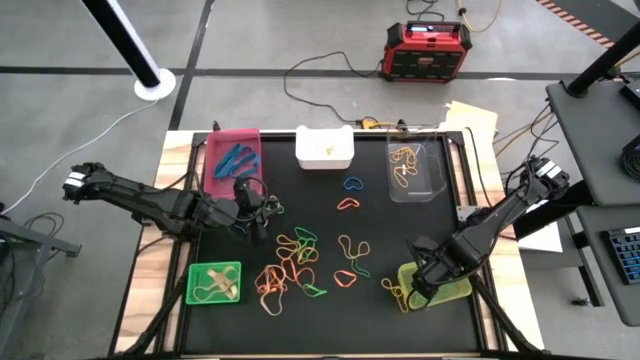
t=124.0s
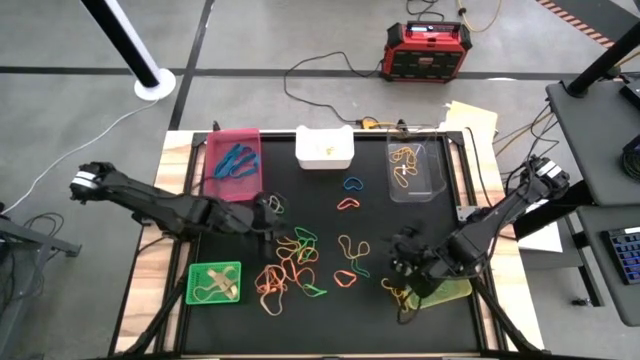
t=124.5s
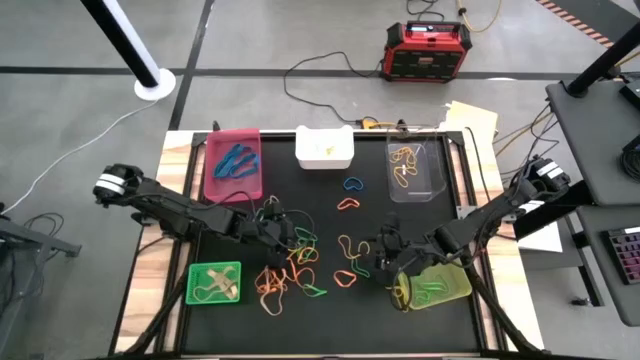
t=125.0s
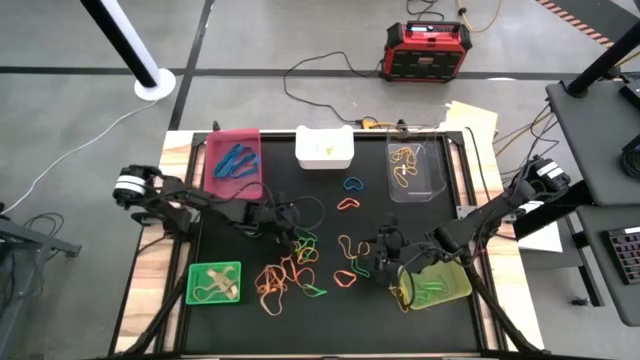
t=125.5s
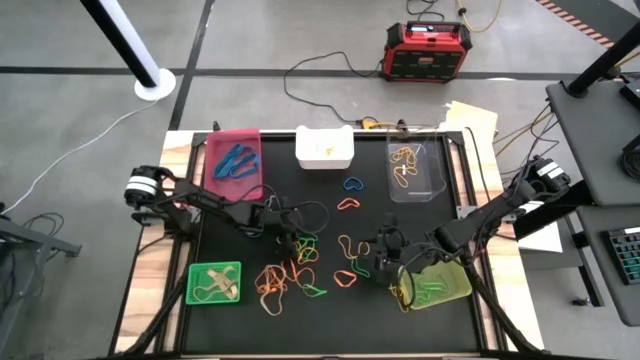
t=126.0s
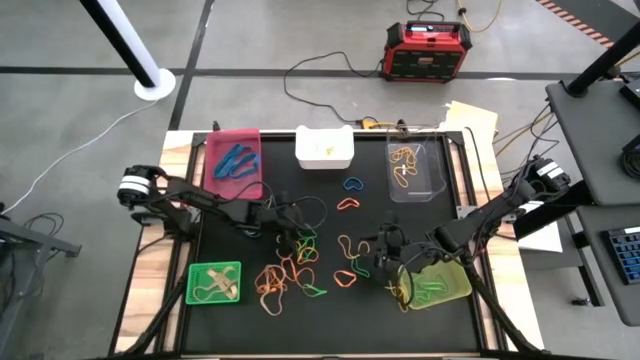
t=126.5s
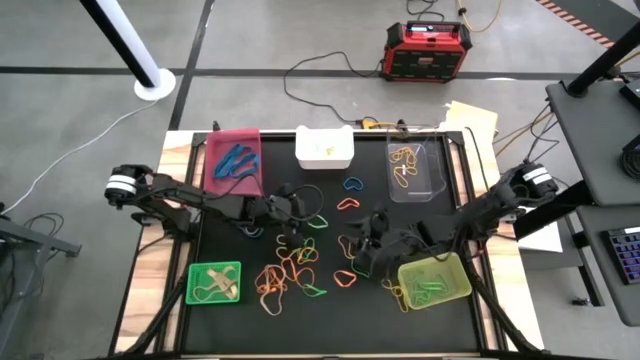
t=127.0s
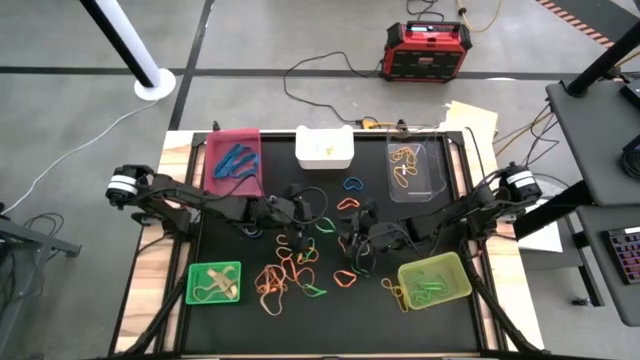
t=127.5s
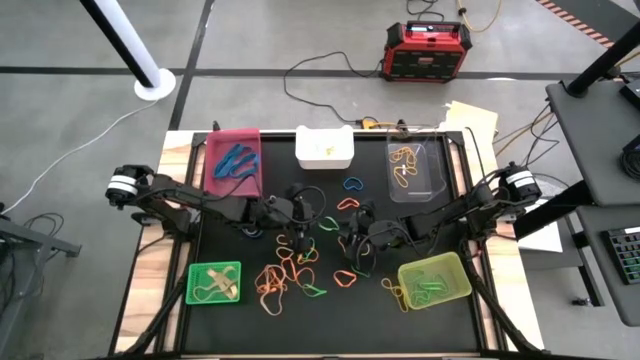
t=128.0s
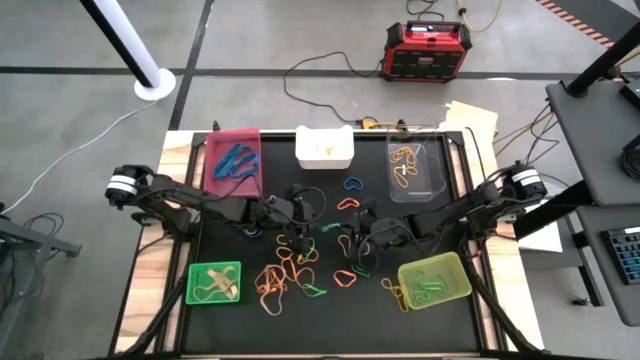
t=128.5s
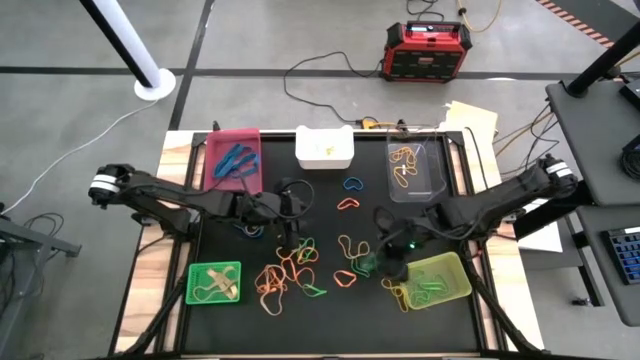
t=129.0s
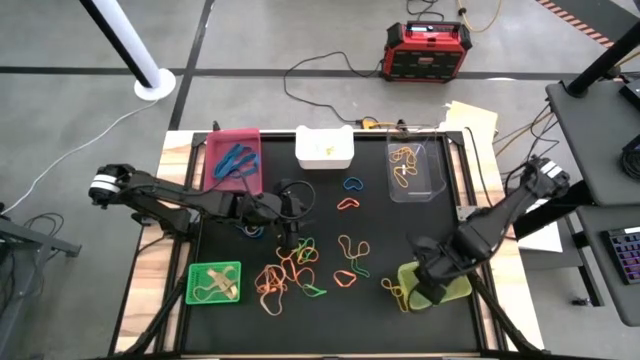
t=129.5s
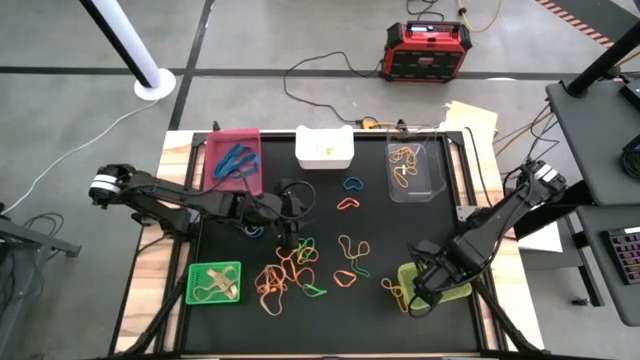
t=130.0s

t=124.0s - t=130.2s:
Task: Sort rubber bands into baskets
Put the green rubber band into the yellow bin

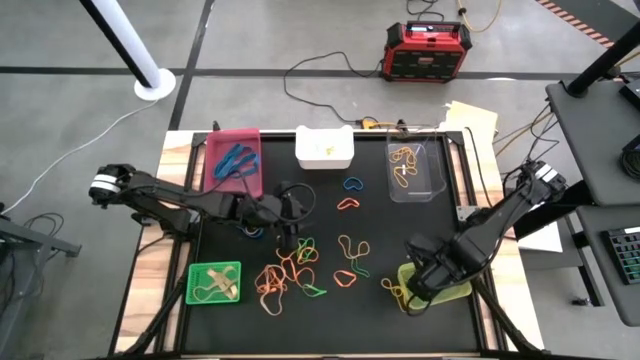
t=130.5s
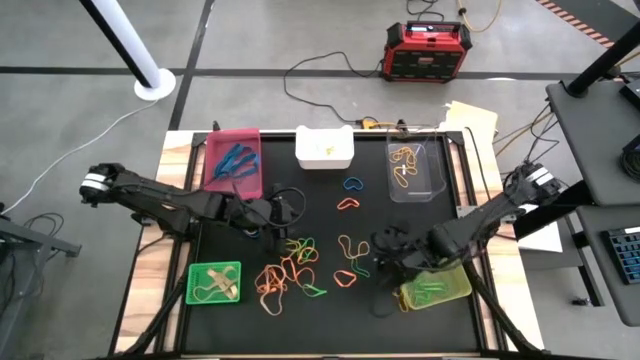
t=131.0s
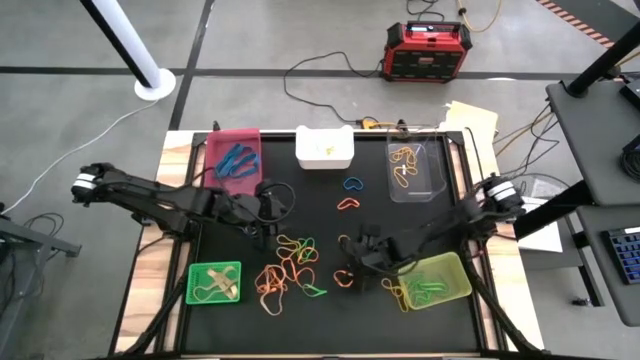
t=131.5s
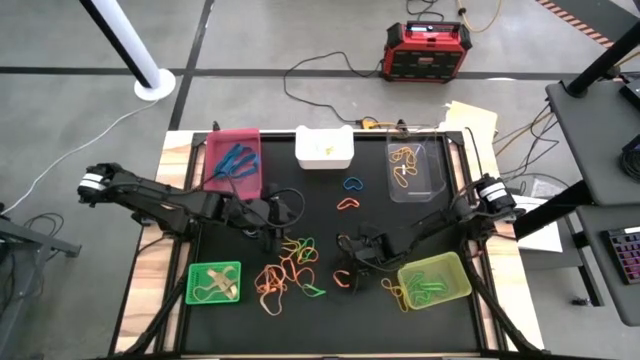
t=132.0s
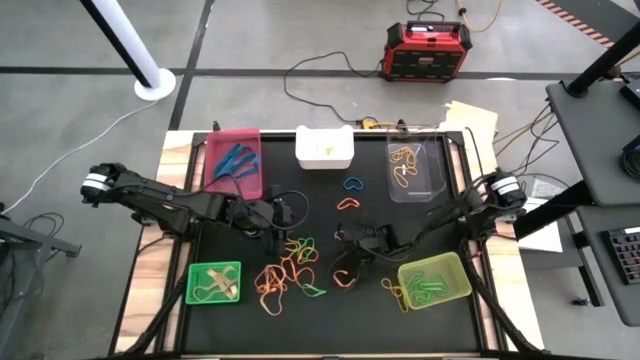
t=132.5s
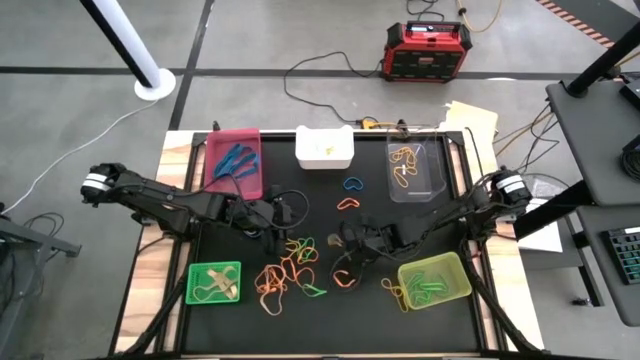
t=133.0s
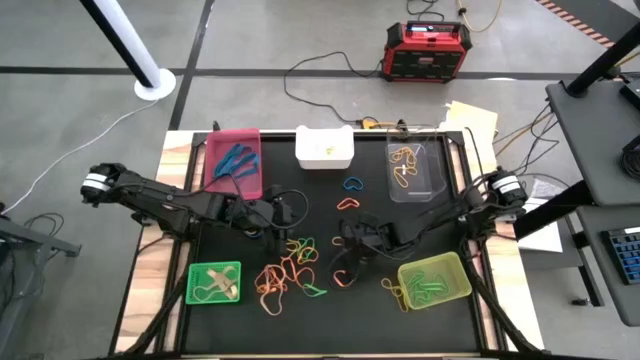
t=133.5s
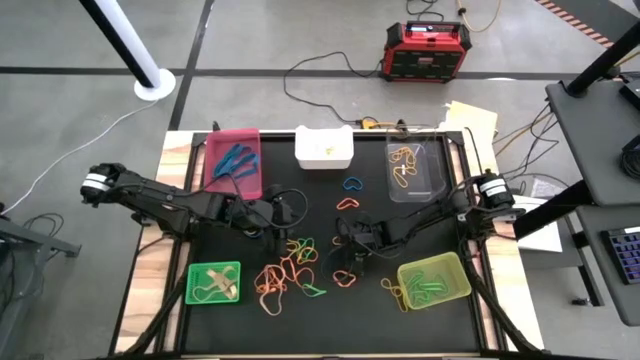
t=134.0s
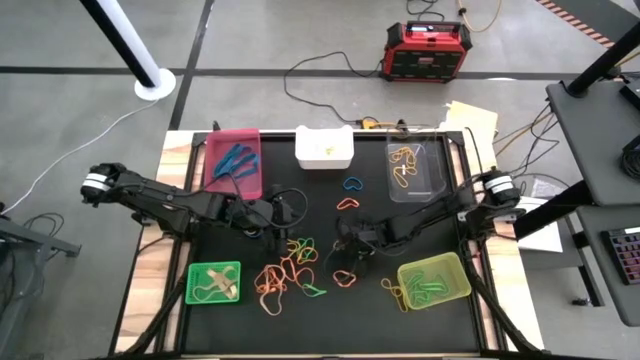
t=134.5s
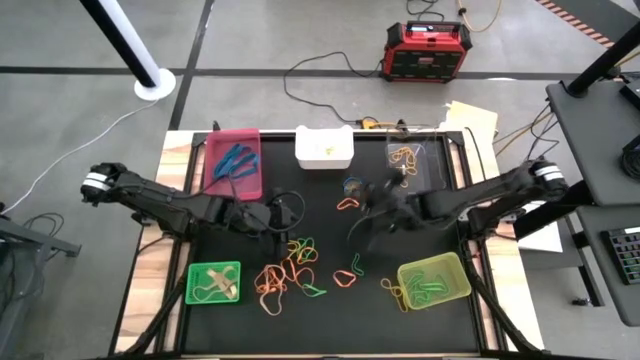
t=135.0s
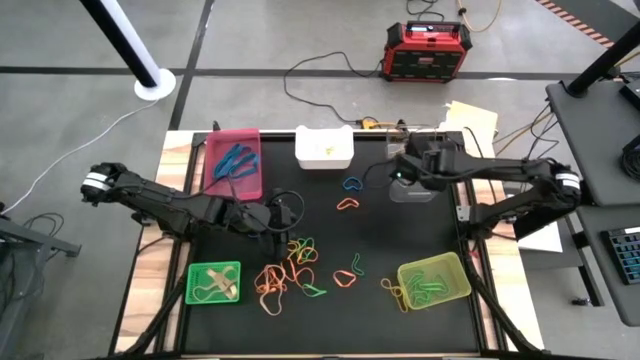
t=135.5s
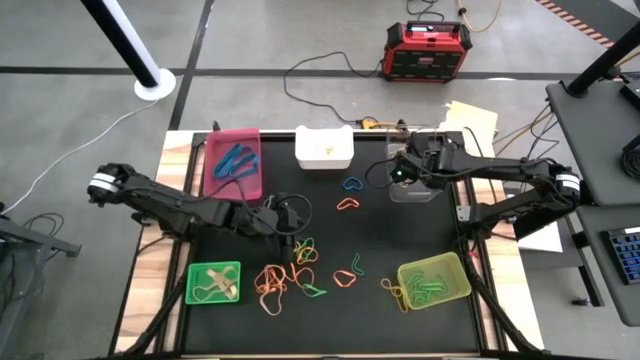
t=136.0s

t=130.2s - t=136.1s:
Put the yellow rubber band into the transparent bin

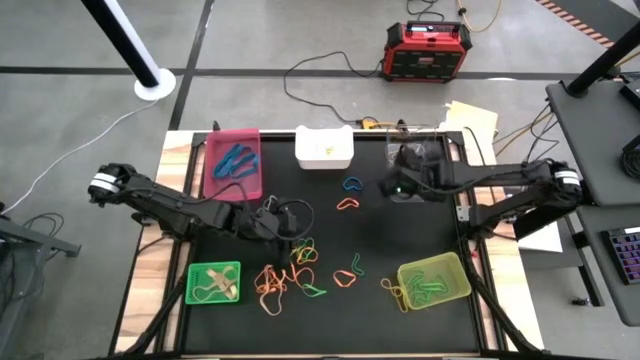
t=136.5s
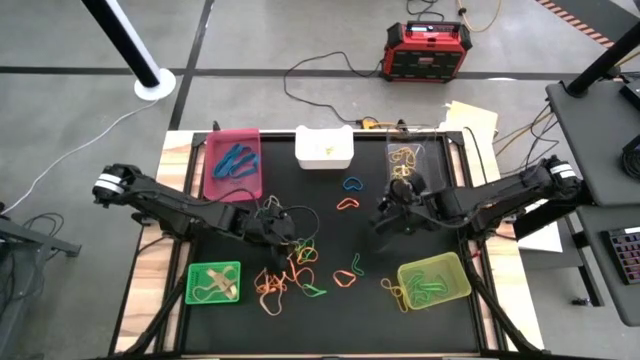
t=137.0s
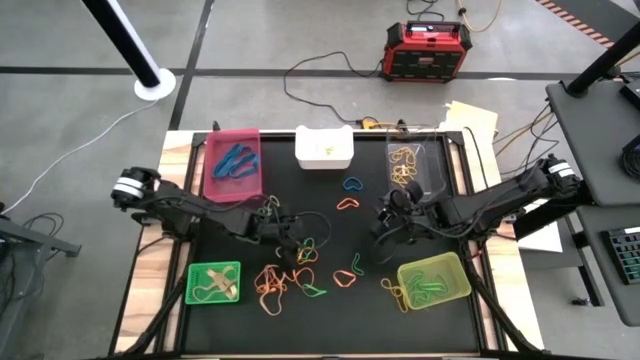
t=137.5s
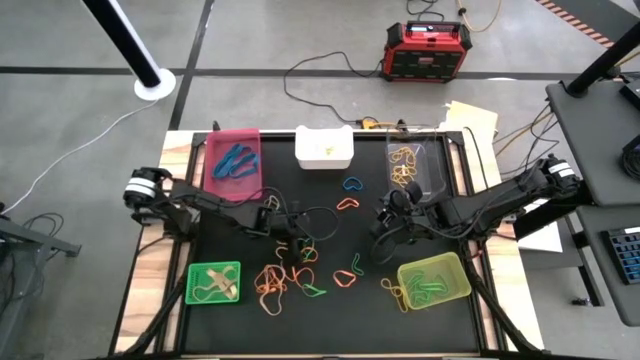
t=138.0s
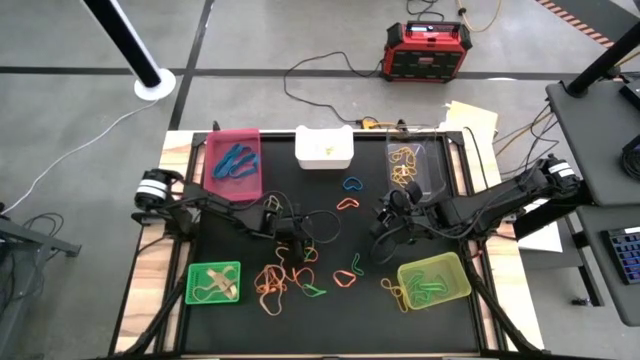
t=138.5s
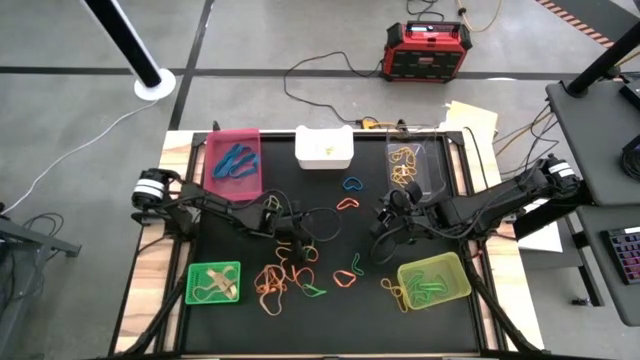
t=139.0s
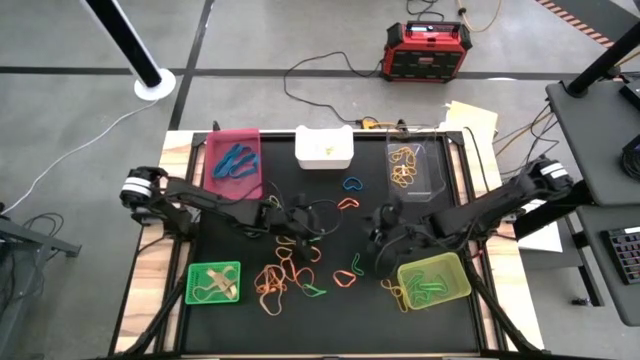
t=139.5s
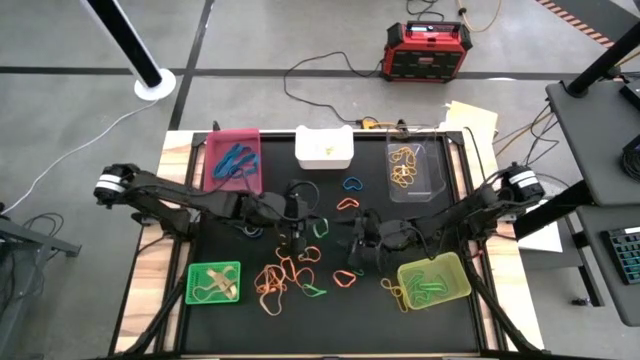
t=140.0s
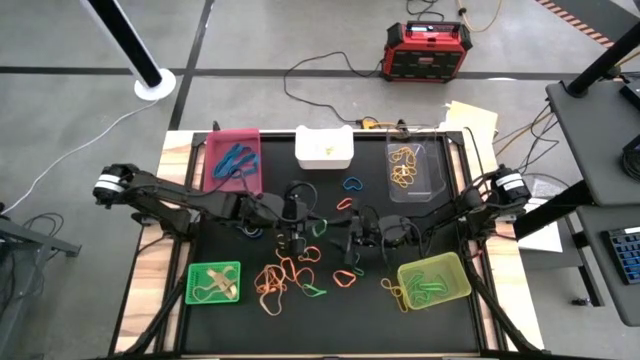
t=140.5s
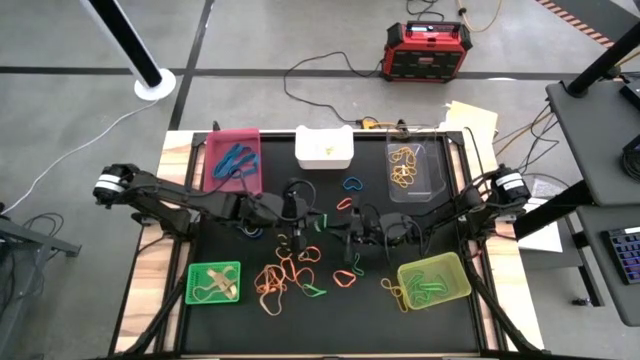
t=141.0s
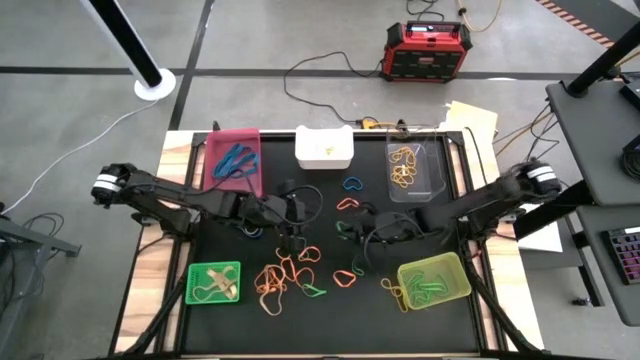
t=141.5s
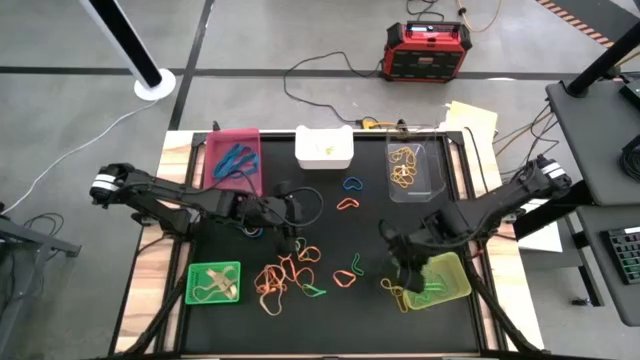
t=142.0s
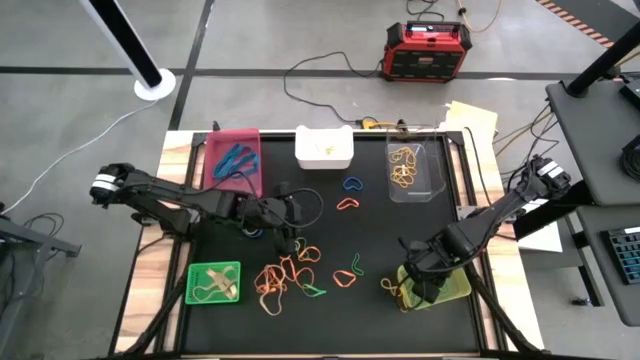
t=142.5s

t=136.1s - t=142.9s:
Put the green rubber band into the yellow bin

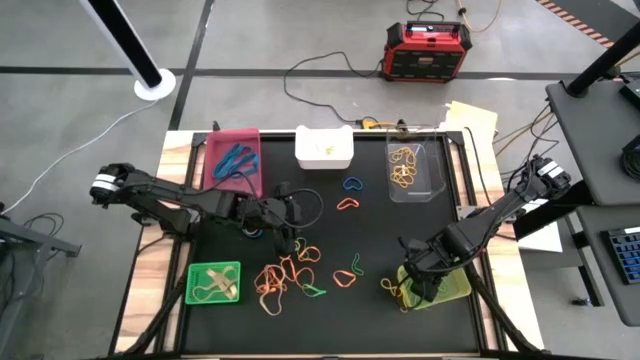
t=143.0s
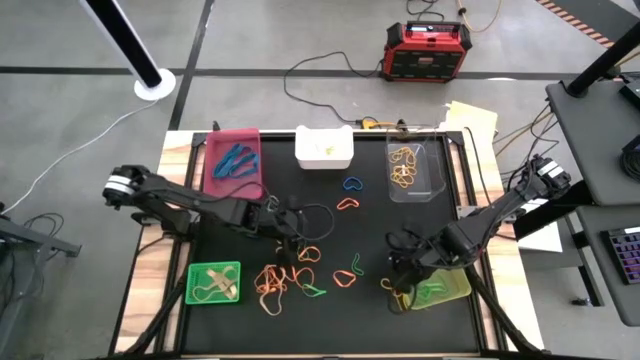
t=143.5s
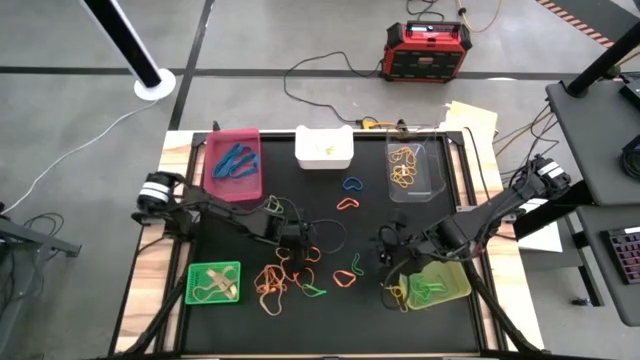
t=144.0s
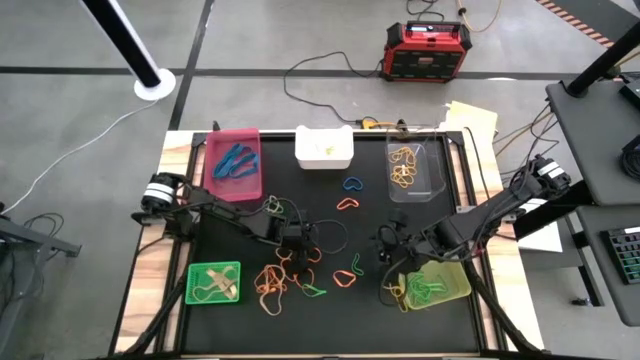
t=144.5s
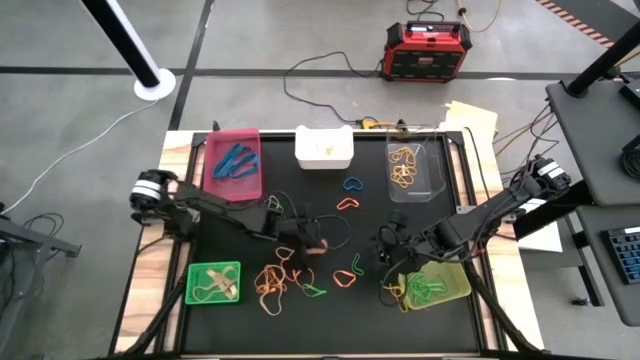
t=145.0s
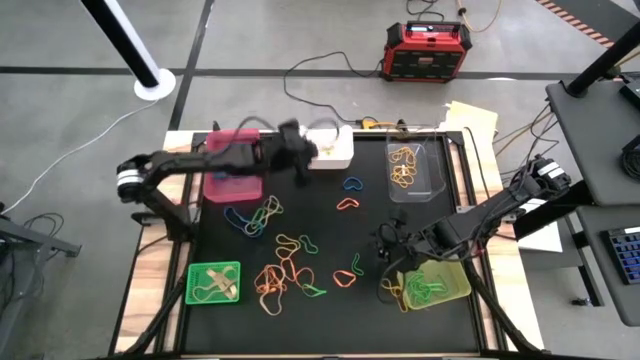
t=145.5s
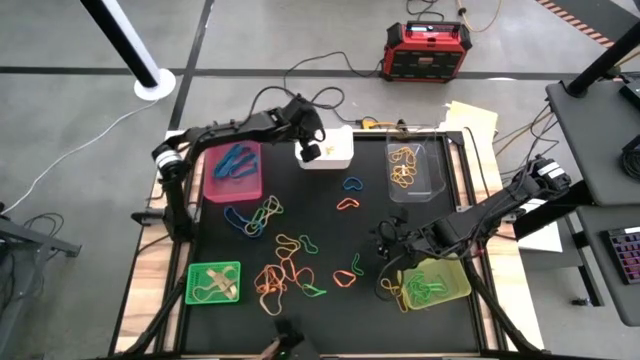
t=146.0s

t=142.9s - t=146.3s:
Put the orange rubber band into the white bin
